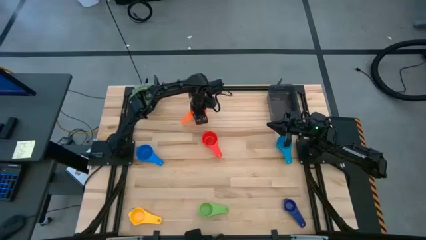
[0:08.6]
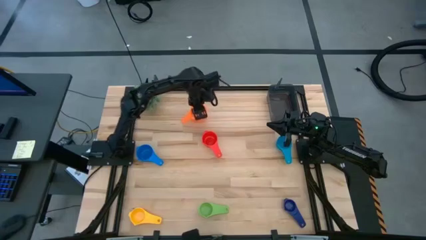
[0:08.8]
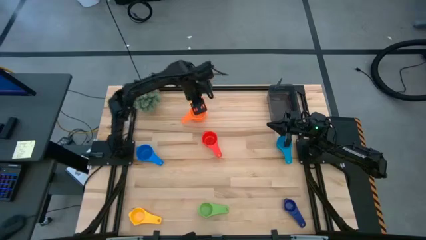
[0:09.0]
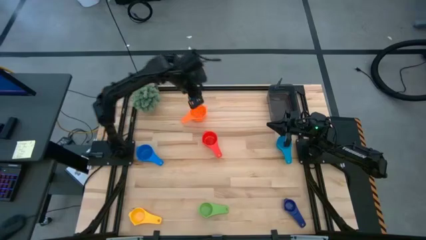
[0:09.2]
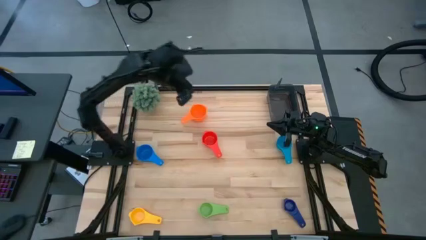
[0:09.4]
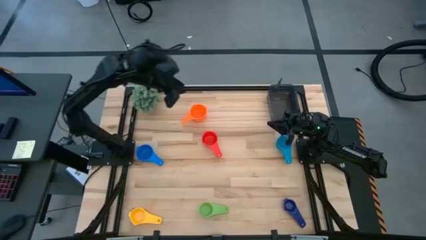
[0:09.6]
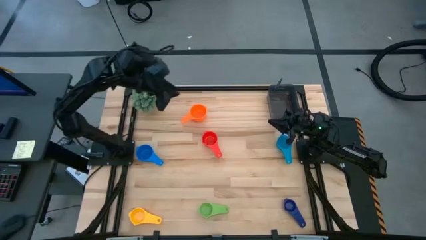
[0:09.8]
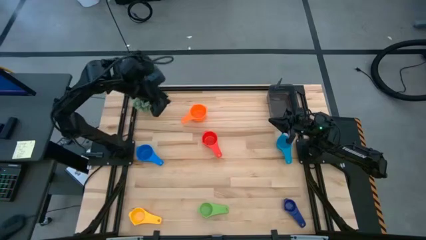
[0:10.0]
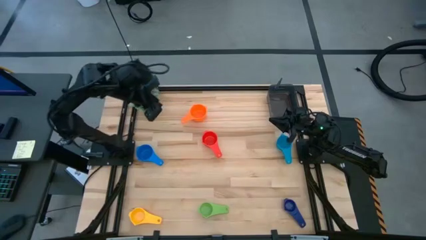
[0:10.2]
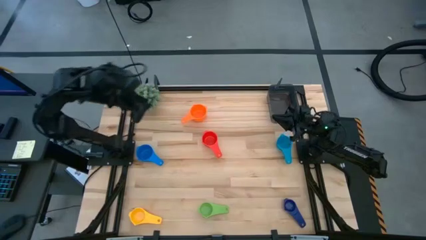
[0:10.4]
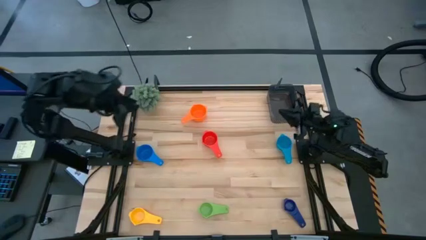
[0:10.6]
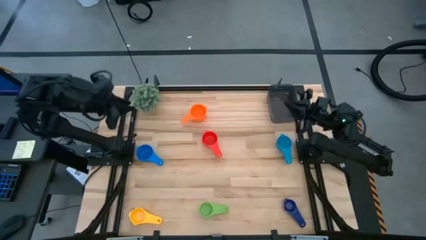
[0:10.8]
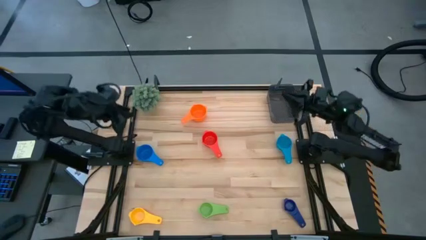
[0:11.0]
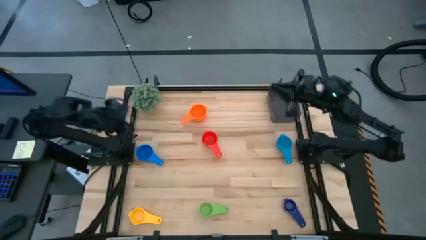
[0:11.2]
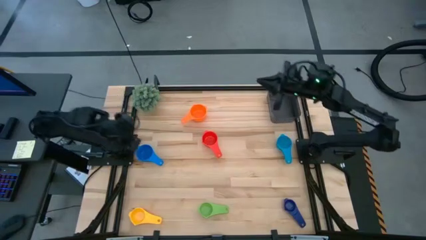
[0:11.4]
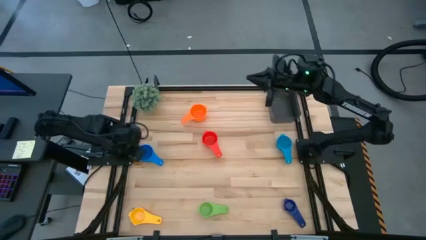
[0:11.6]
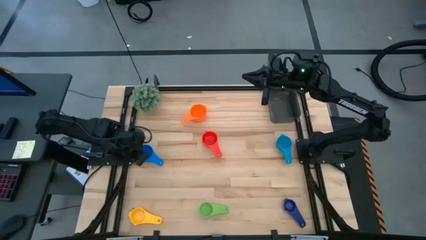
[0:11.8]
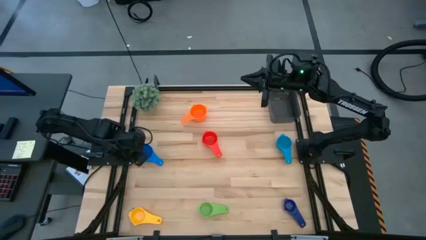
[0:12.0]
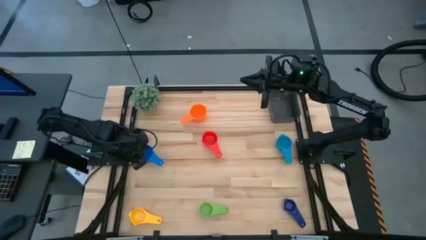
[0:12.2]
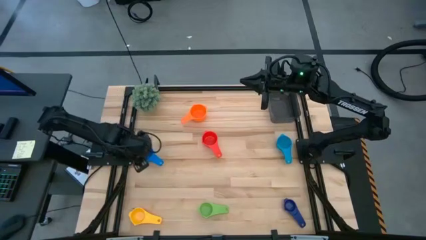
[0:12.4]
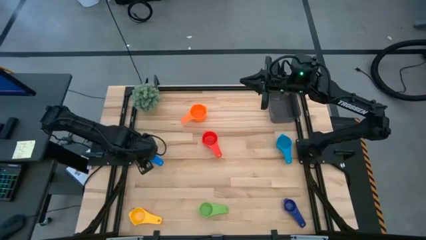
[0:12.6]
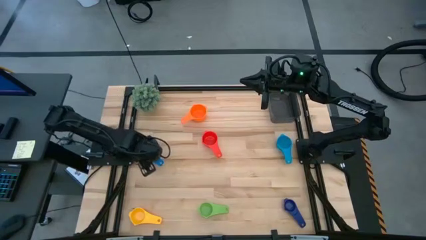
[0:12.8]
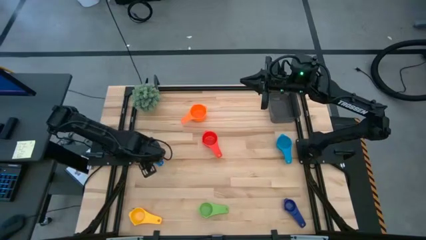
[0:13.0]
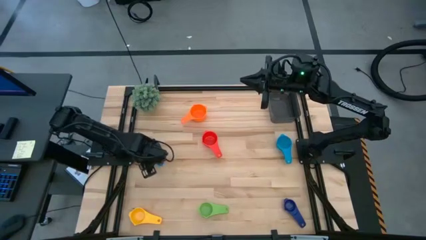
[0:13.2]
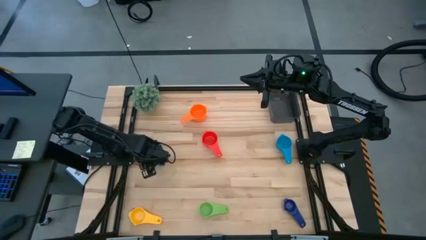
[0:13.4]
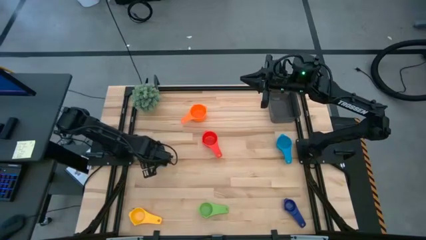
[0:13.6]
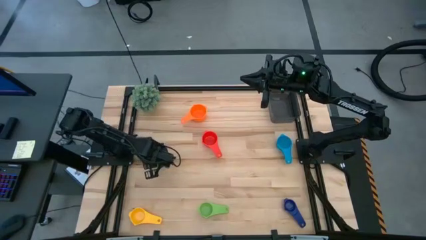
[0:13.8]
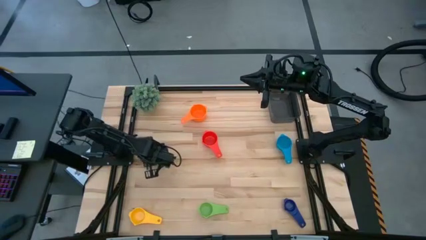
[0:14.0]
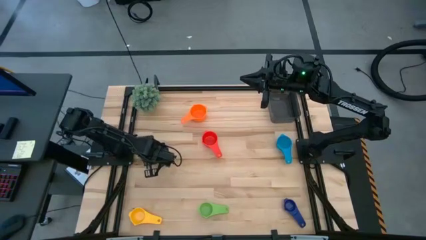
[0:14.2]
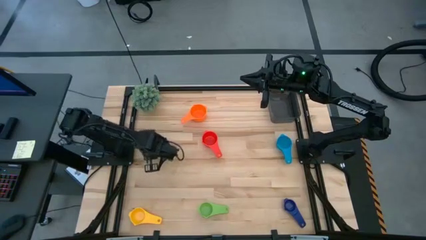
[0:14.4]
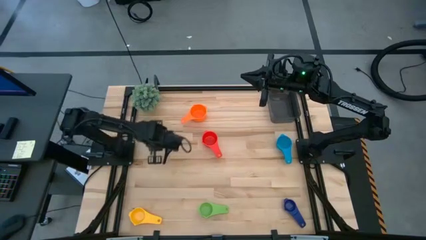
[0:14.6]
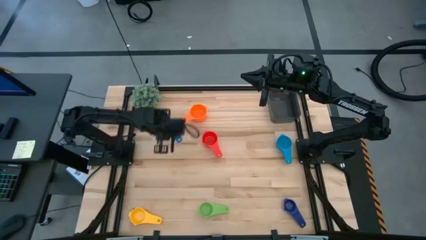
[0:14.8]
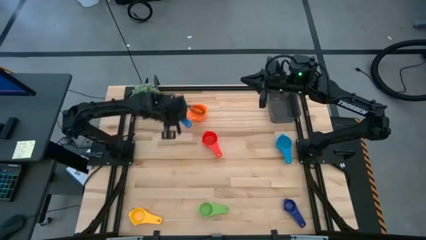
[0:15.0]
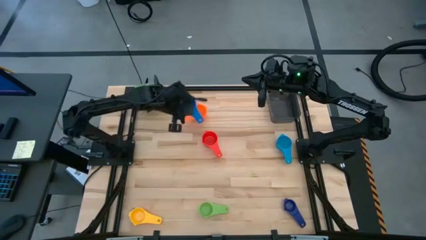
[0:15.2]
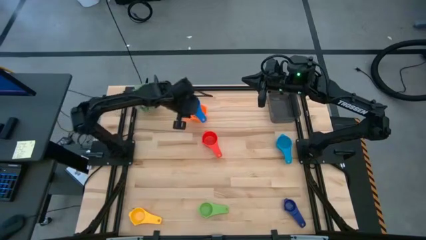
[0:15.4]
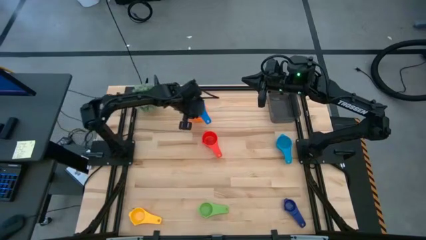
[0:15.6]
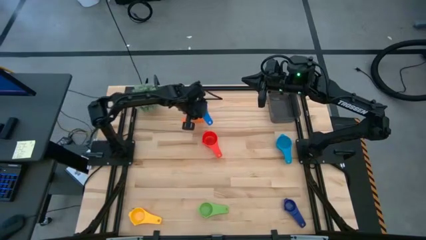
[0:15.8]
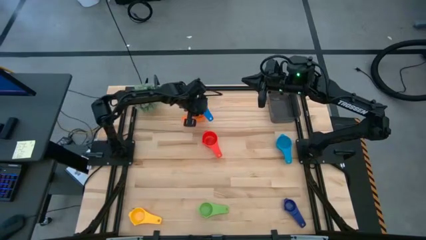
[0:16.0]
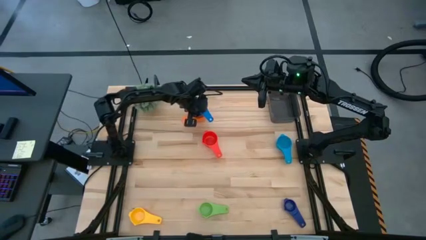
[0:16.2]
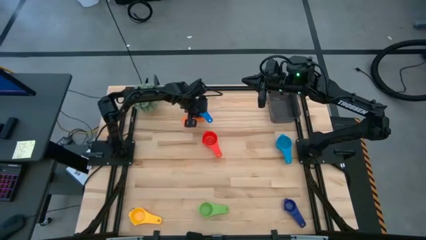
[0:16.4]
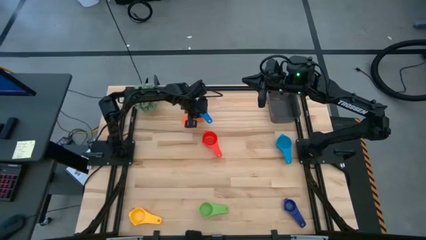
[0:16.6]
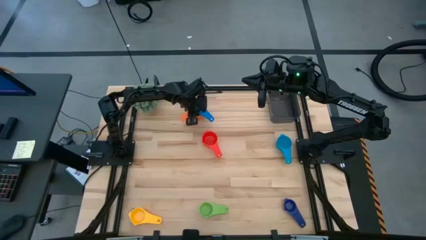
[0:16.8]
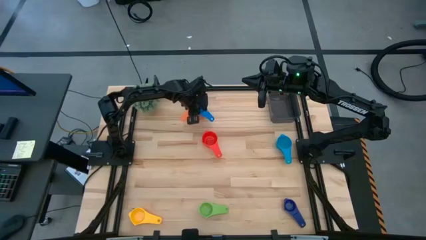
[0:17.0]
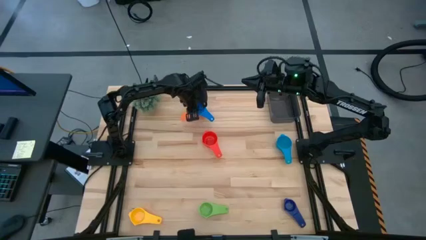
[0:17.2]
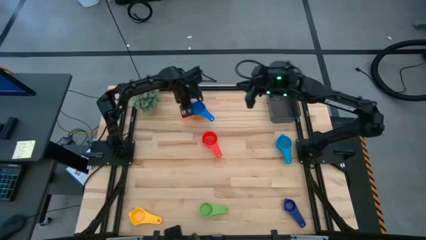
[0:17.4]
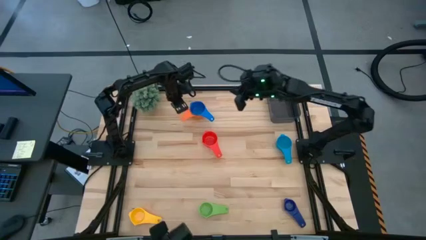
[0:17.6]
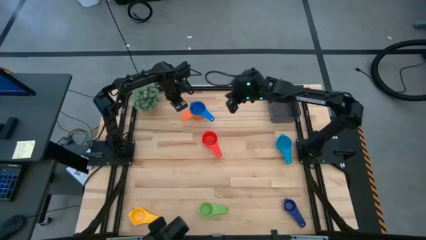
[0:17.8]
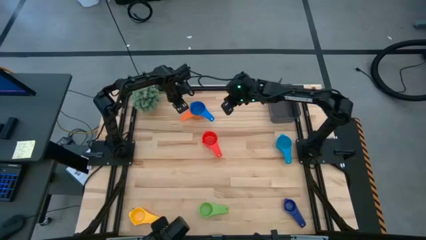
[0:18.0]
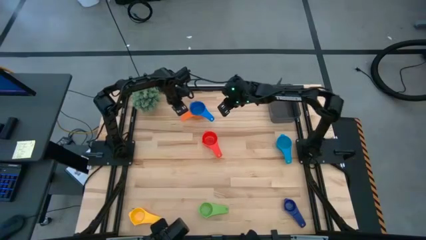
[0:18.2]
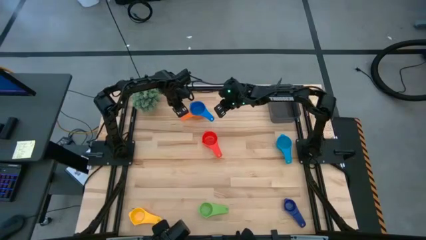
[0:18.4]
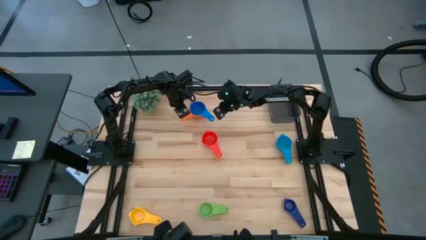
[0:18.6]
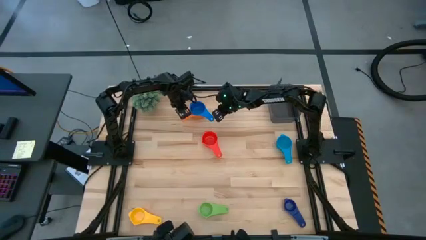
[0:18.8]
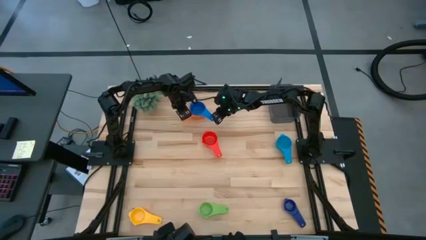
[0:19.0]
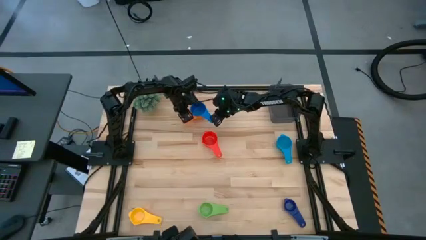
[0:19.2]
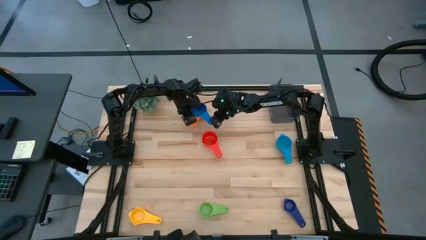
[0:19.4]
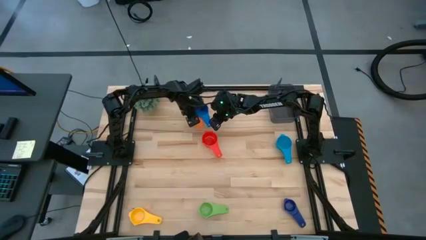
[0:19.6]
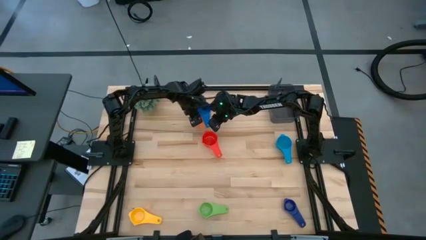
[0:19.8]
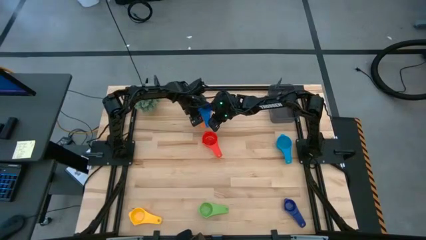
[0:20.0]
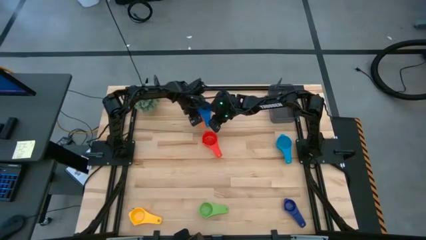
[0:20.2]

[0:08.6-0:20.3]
Task: Nest measuring cups in basket
Stack the blue measuring cup on top of the orange measuring cup

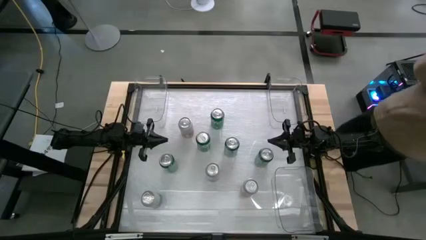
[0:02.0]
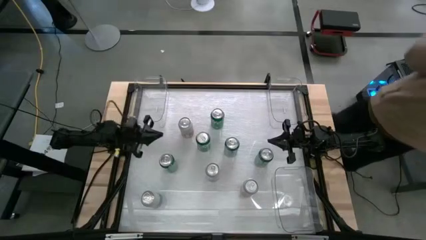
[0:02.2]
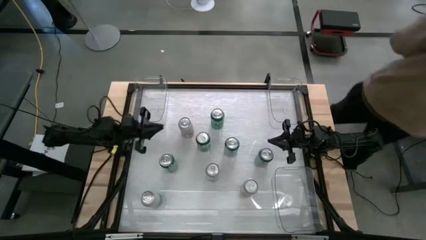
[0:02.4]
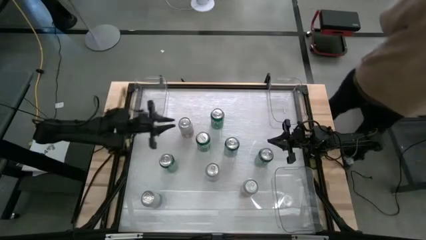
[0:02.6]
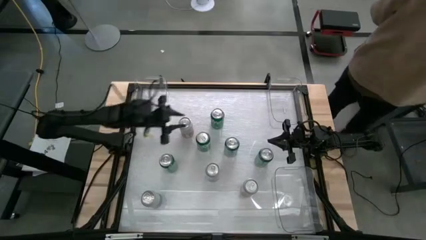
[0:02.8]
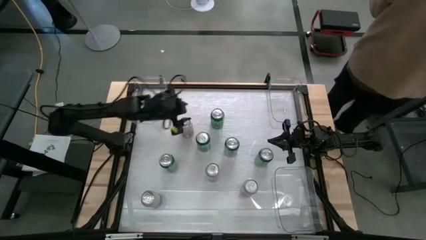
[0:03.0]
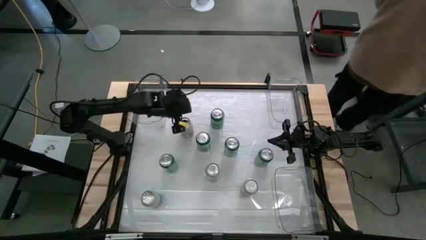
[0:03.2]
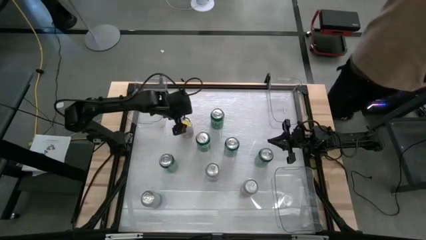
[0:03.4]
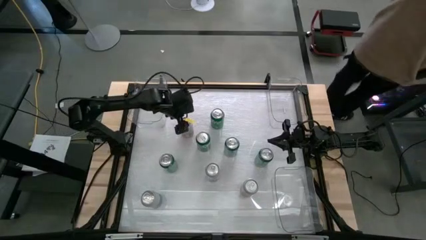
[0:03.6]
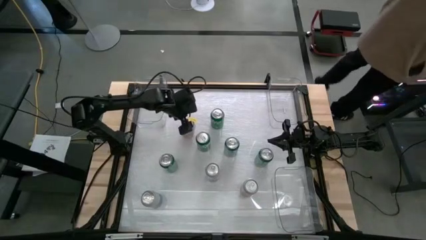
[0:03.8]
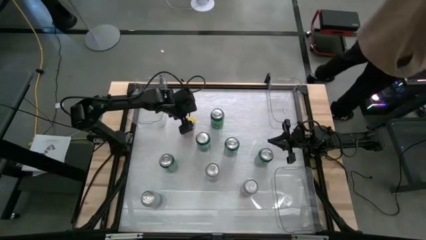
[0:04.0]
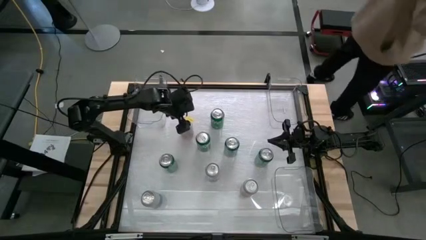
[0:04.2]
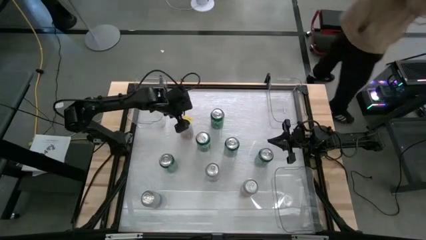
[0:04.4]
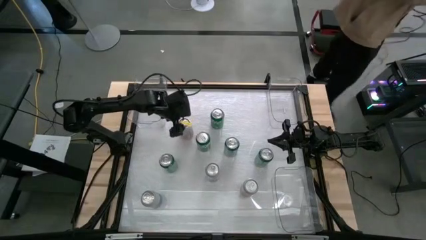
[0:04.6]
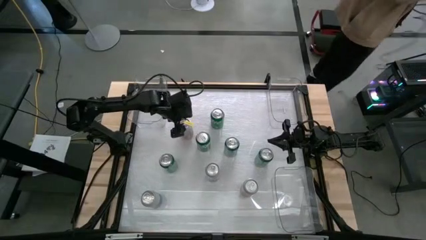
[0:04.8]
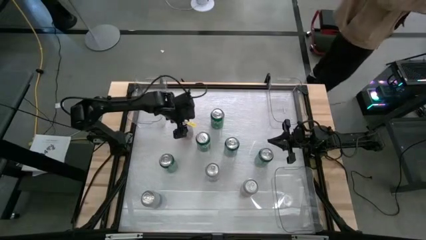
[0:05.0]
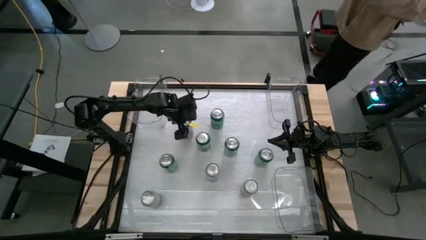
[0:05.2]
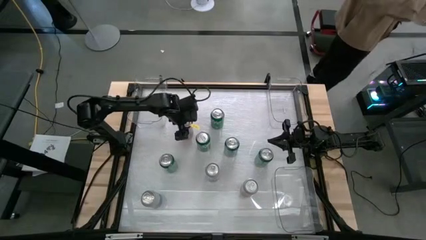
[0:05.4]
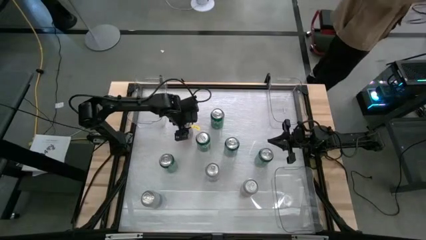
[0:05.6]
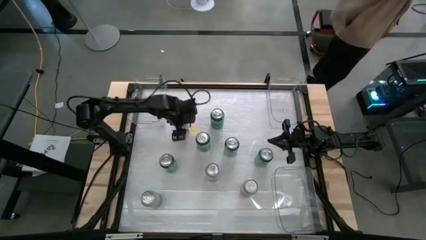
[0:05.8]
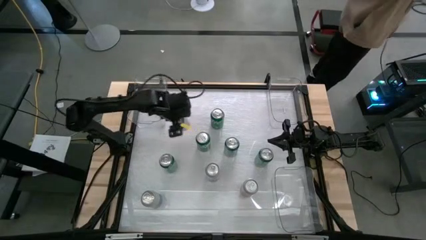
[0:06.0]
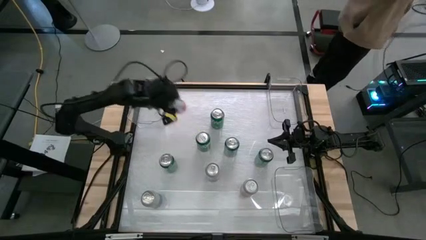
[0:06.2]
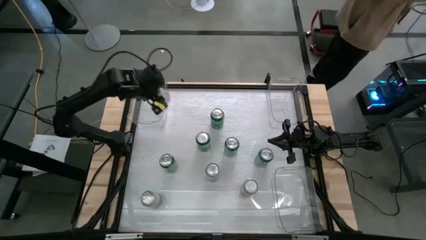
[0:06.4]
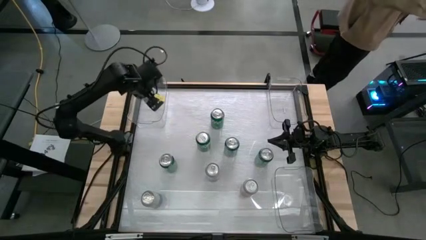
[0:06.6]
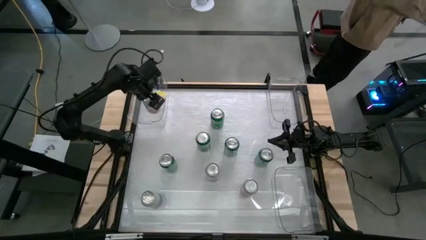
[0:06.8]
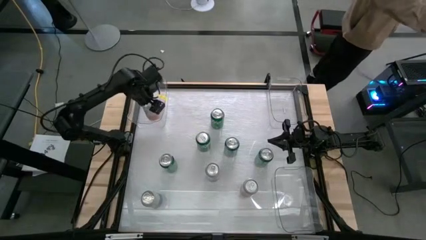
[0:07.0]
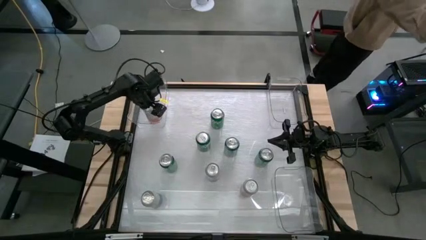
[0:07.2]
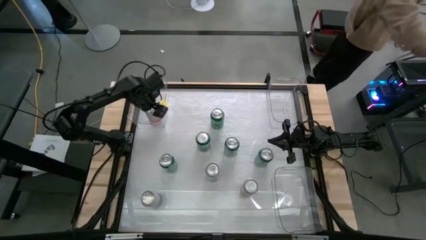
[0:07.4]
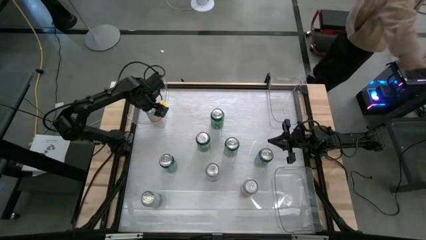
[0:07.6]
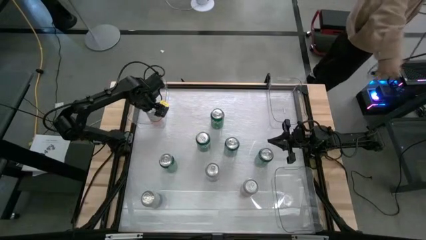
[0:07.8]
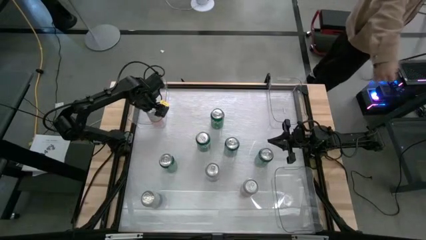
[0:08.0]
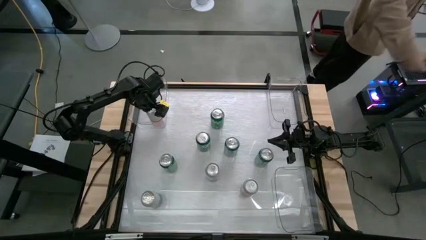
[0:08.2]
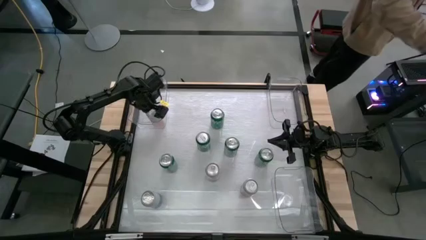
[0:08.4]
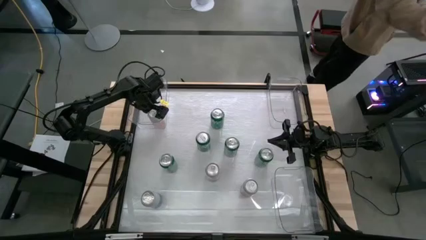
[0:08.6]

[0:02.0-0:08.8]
Task: Sort soda cans
Put the orange/white soda can into the left transparent bin
